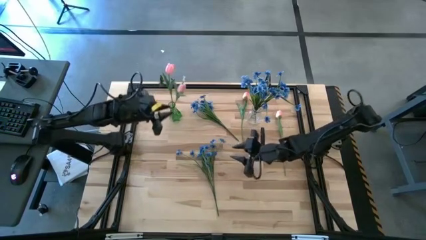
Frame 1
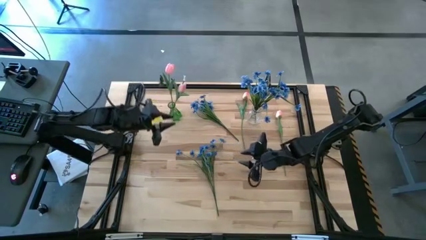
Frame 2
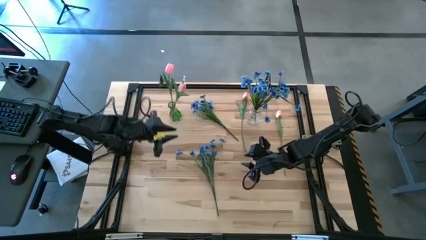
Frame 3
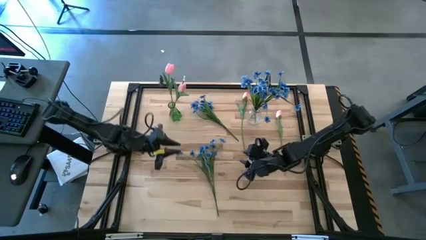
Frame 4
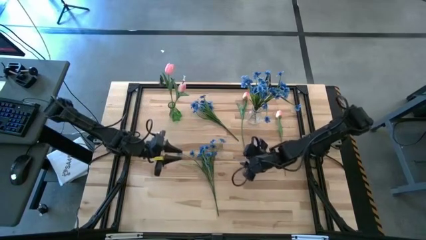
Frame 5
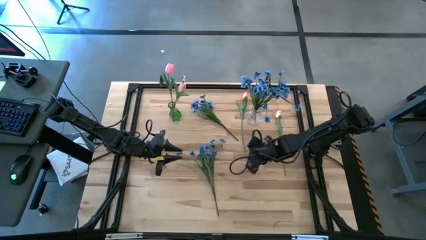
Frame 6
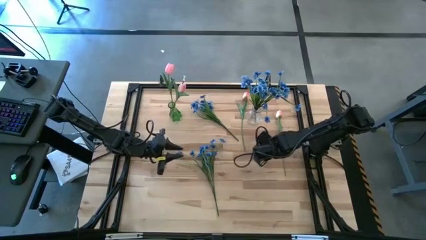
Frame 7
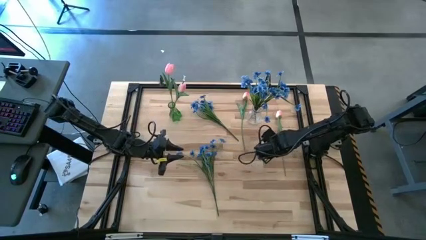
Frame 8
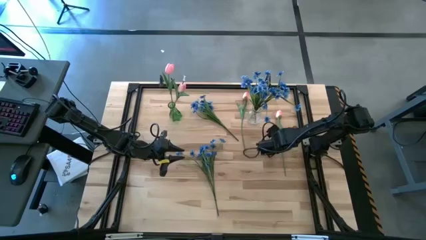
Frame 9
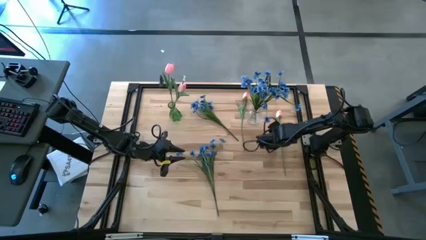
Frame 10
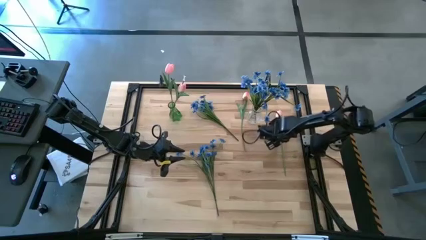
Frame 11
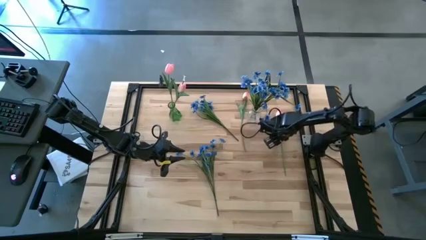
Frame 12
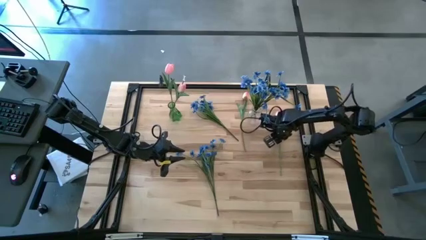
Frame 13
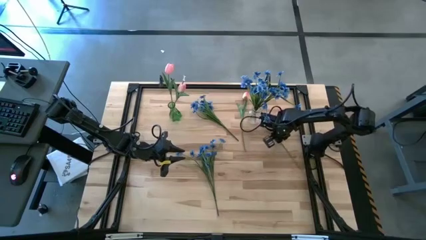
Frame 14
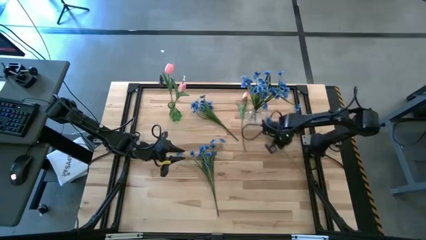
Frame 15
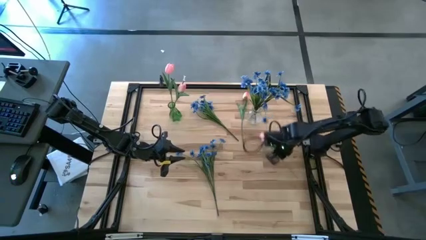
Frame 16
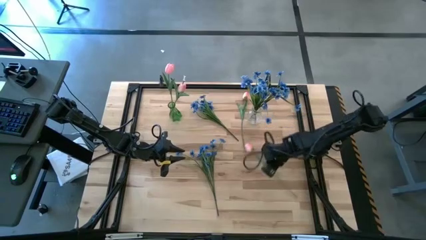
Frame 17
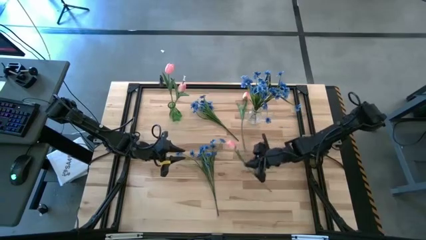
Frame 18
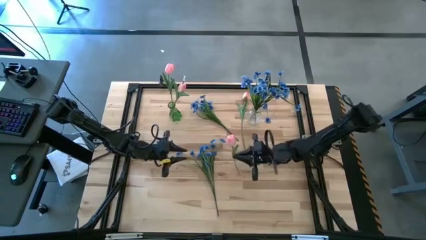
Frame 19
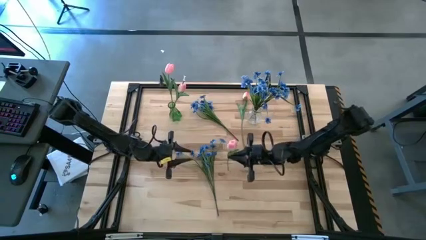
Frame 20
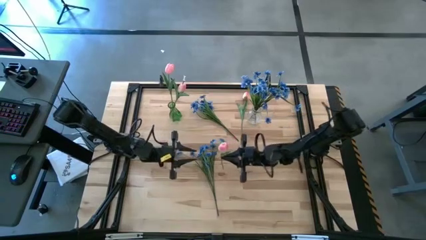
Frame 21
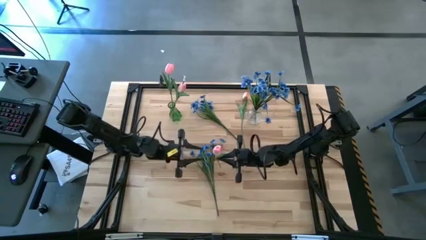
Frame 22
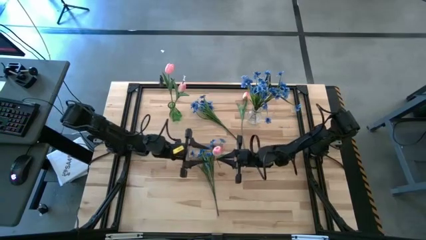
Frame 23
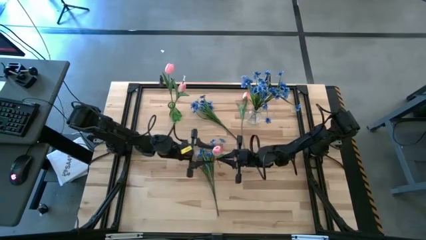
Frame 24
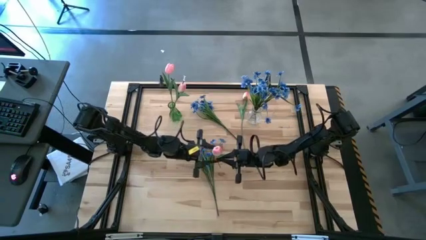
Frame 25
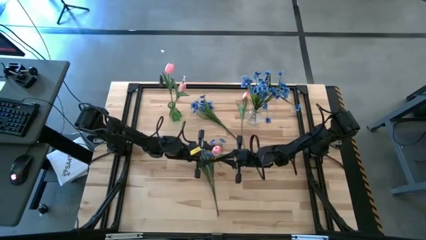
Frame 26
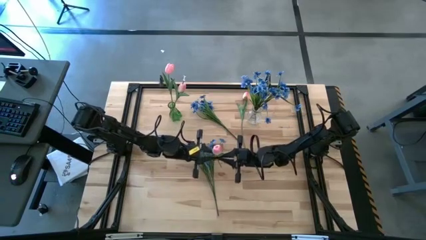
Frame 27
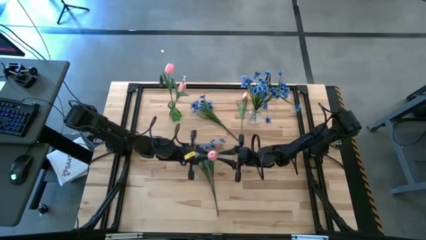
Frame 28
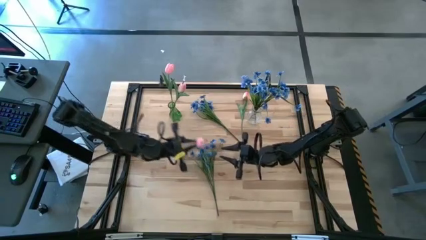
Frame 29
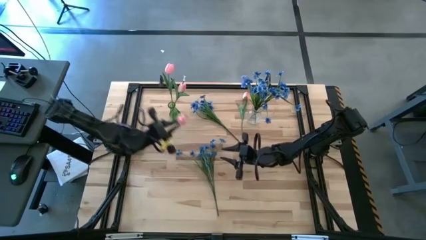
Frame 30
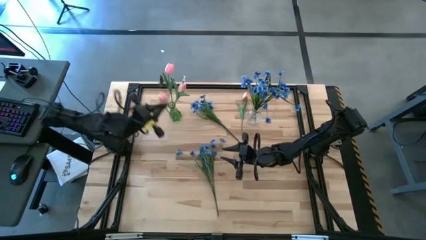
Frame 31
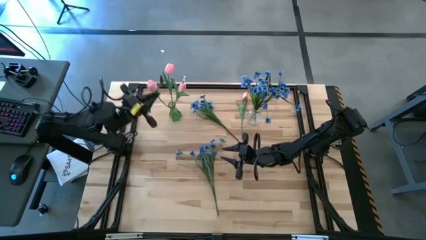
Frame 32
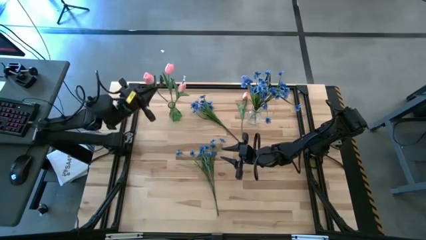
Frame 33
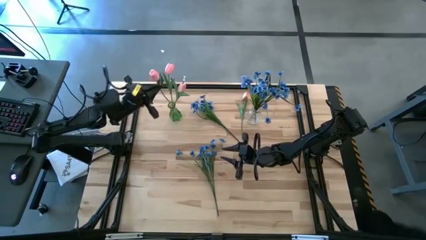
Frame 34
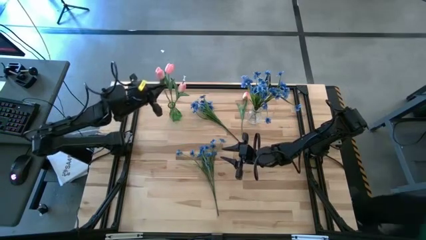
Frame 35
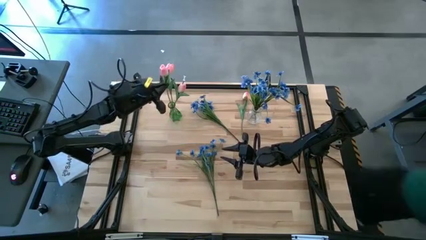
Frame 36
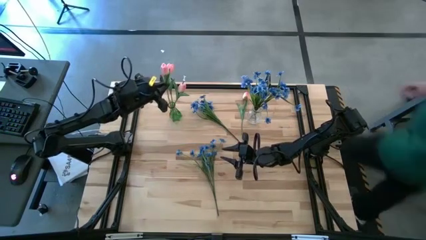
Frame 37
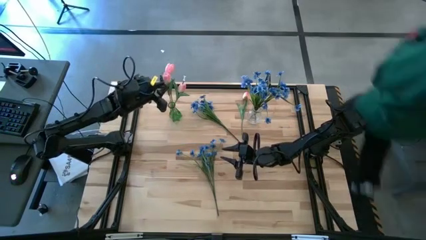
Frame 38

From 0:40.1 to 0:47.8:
Task: Sort flowers into vase by color
Put the right pink tulip into the green vase

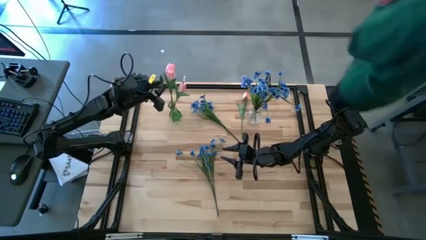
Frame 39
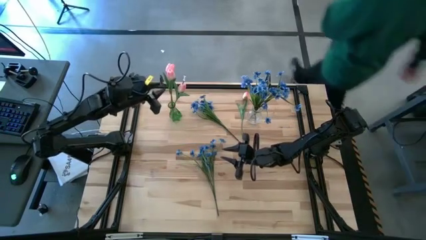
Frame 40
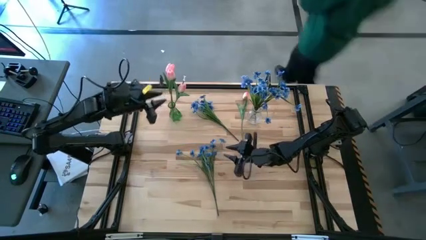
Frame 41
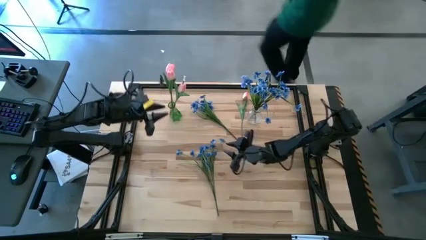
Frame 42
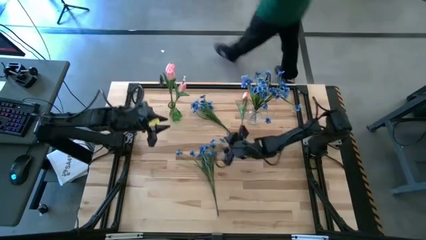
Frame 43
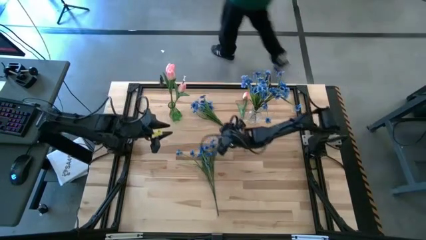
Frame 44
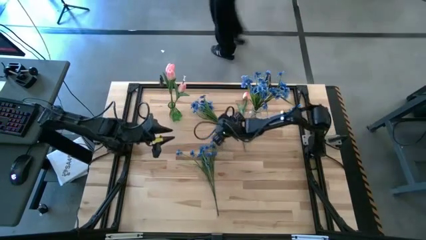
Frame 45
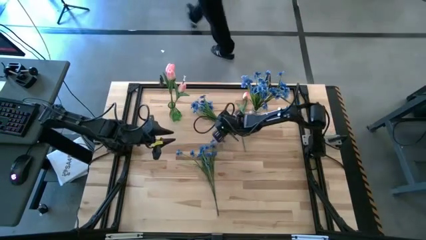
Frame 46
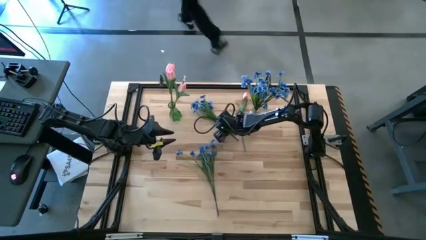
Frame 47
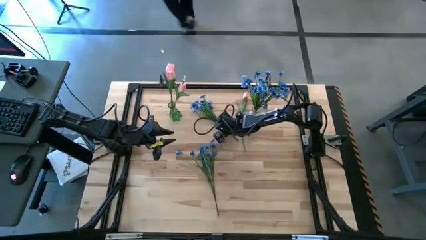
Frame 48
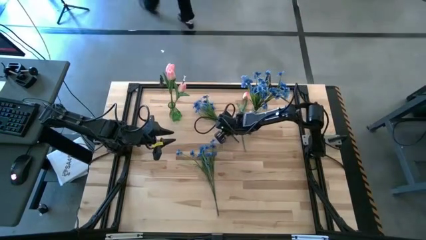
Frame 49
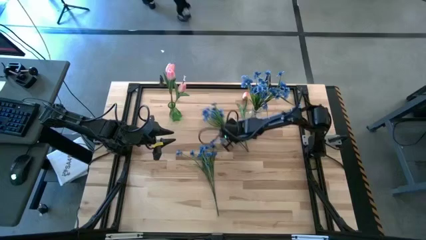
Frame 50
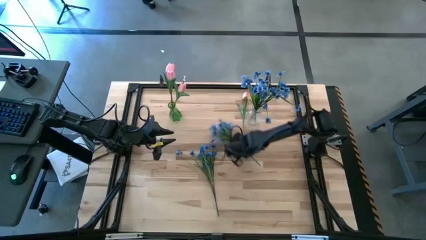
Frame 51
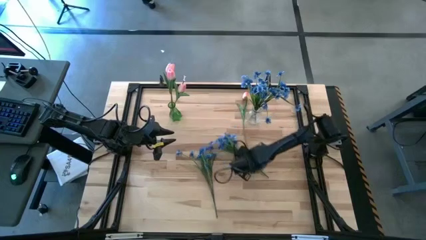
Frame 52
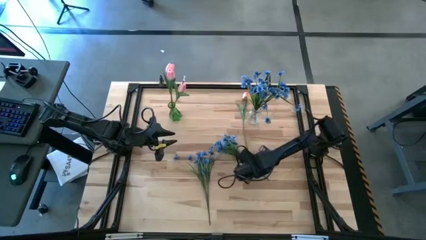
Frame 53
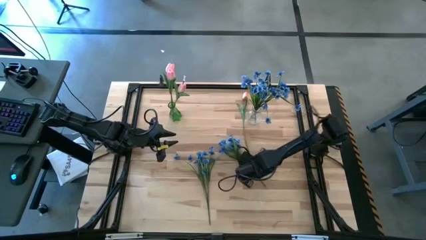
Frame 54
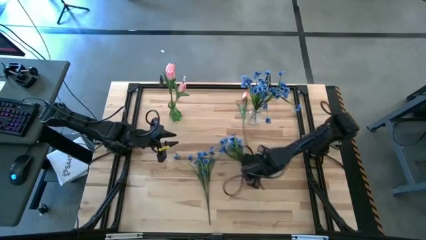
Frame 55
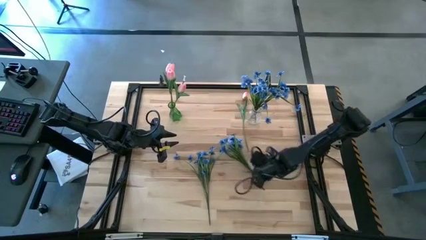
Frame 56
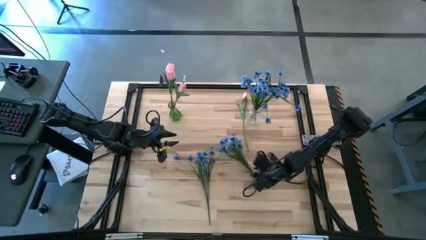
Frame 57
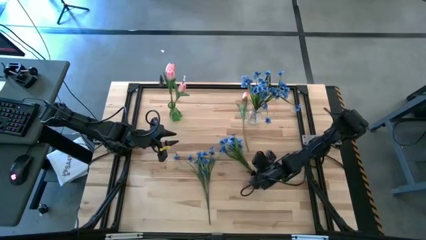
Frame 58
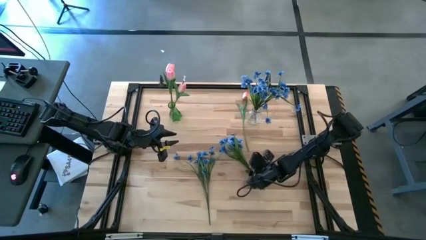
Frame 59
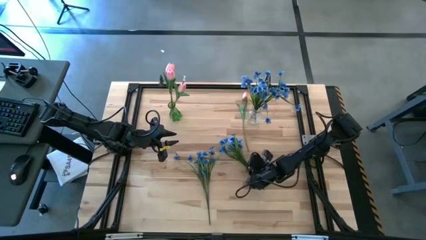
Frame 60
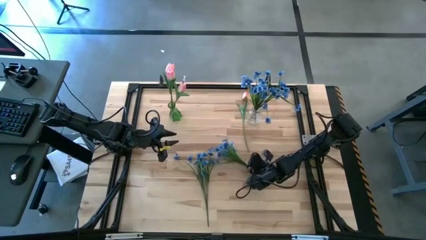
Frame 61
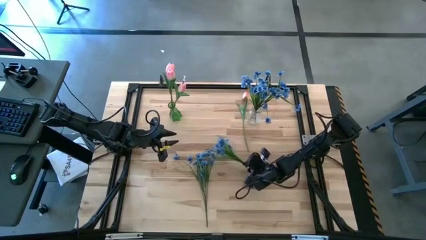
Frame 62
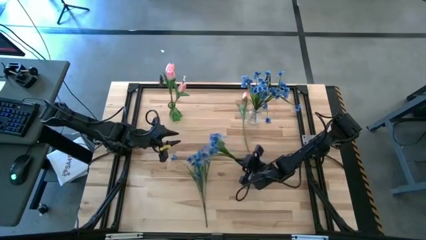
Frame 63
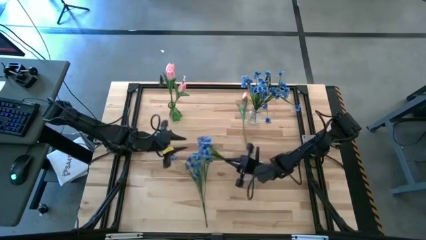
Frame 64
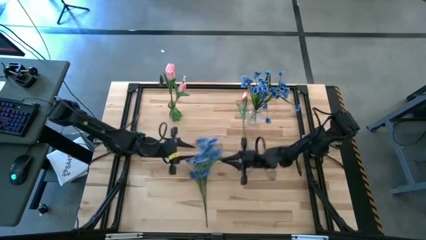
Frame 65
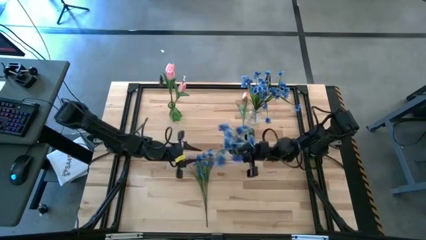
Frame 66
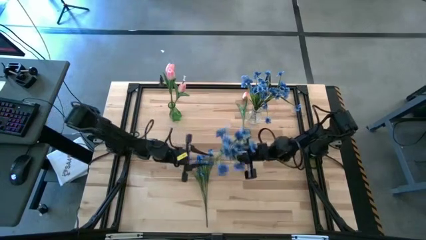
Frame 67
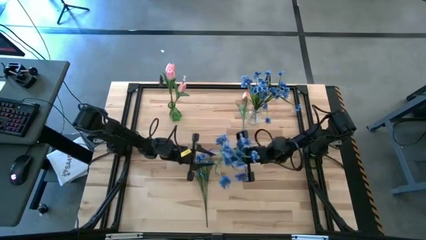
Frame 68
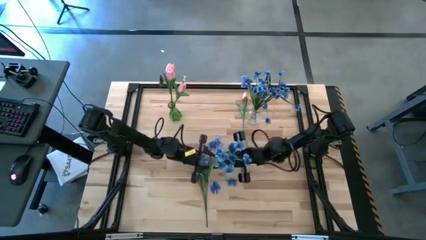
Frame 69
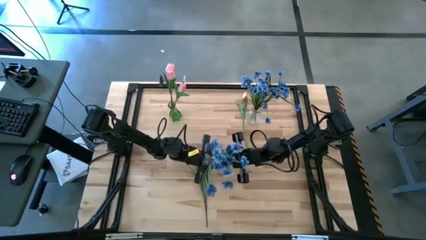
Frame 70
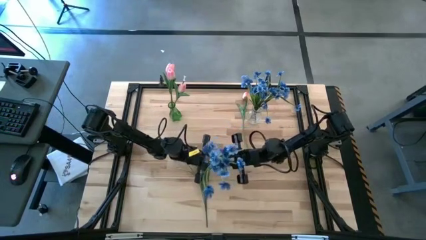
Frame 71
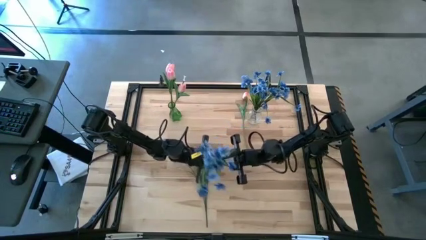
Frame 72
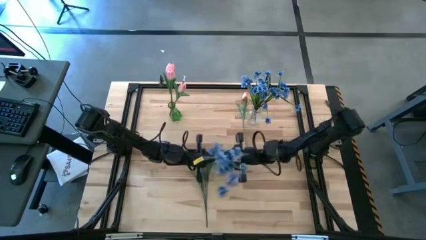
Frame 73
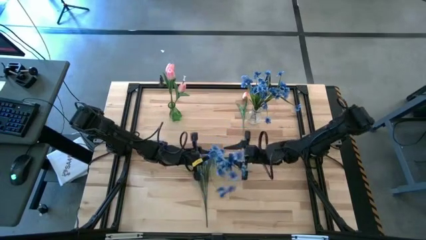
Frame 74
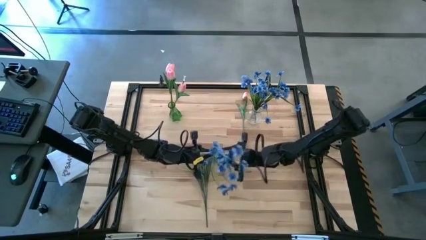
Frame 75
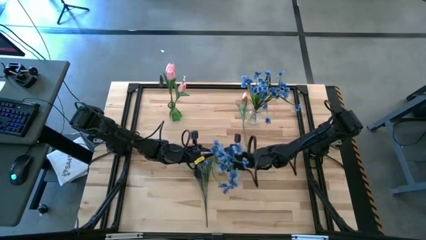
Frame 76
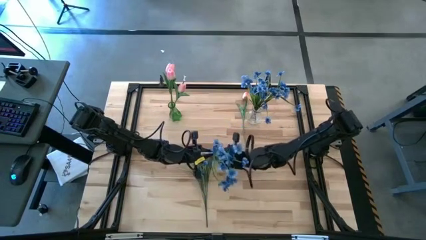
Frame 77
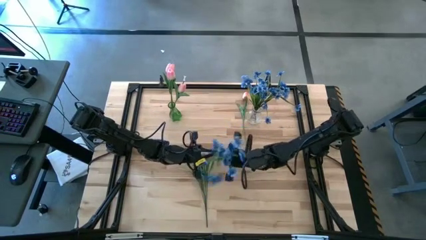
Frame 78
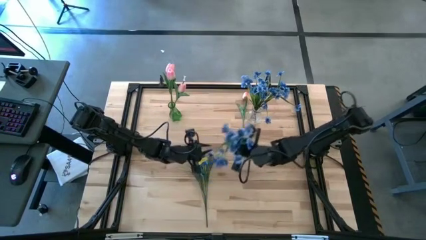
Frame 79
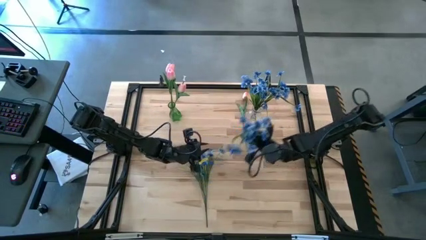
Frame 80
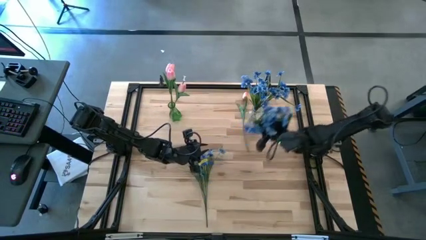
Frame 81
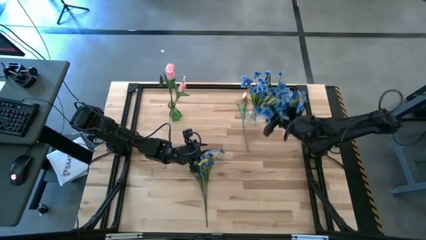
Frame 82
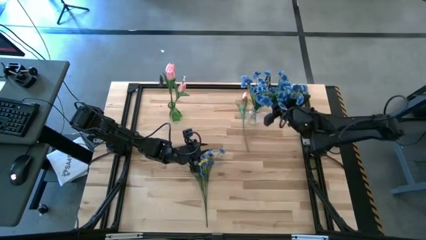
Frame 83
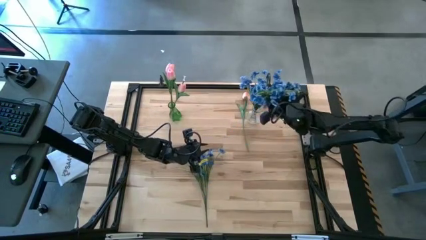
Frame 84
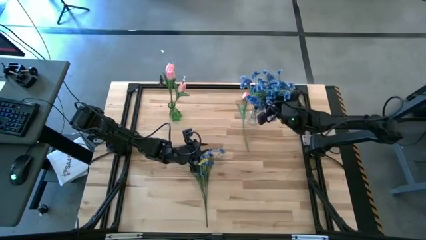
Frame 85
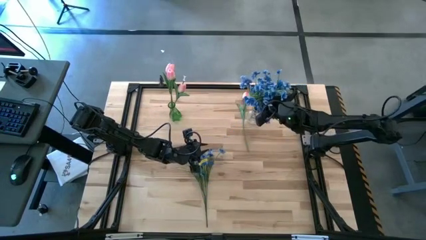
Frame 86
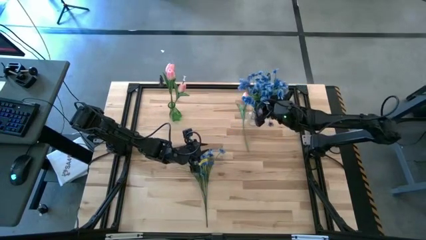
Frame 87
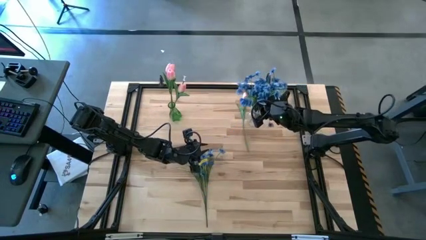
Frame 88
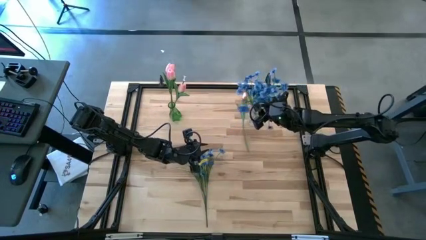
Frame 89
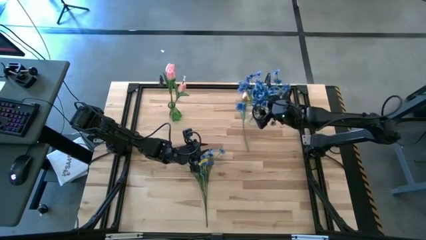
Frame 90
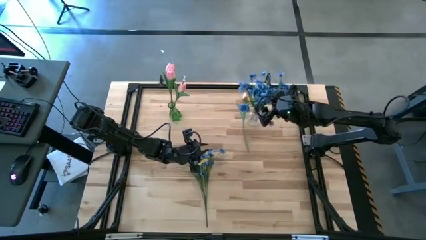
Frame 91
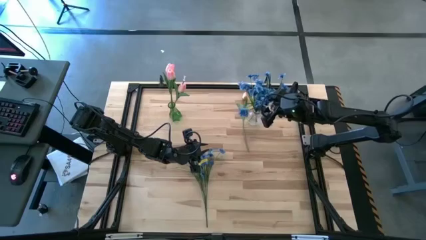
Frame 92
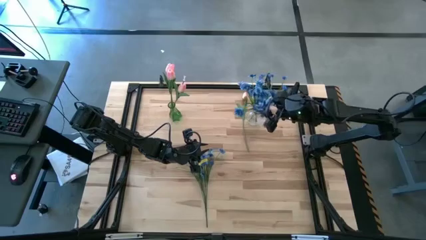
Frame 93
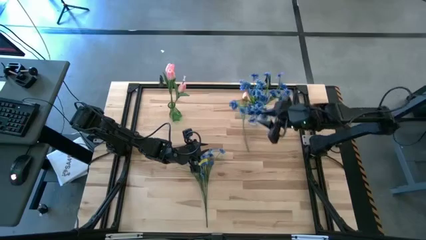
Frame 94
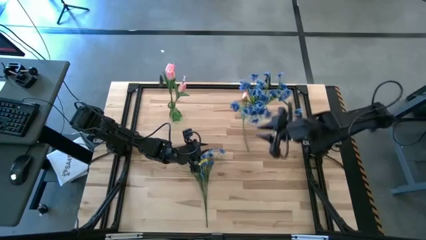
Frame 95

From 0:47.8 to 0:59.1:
Put the top blue flowers into the transparent vase
